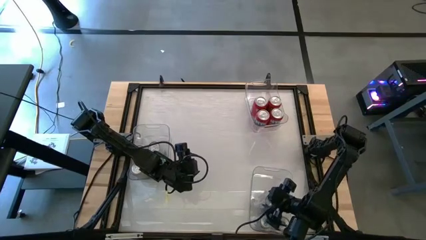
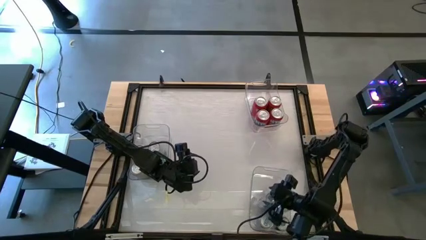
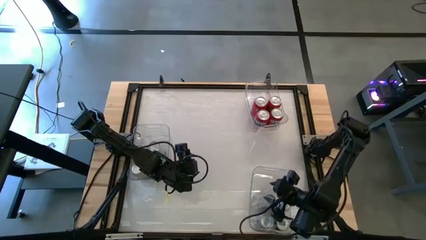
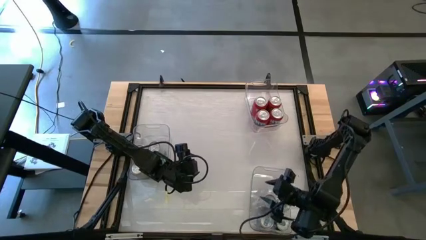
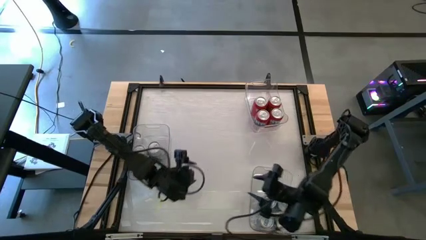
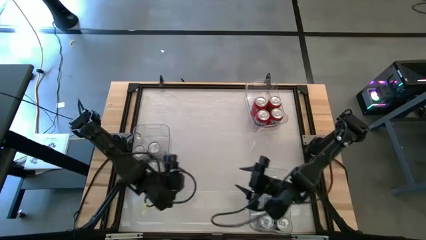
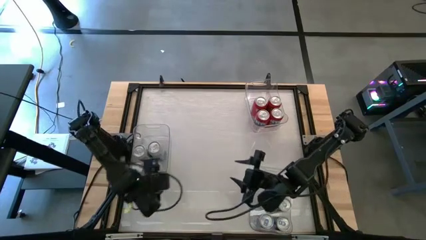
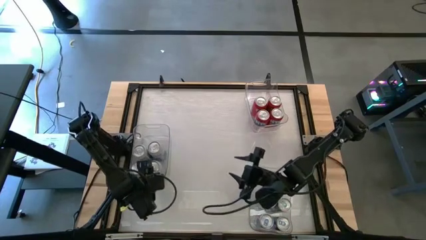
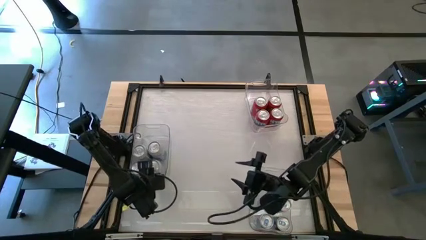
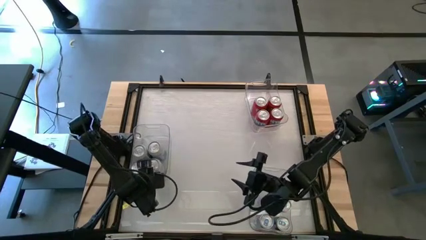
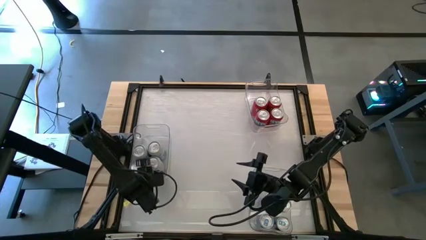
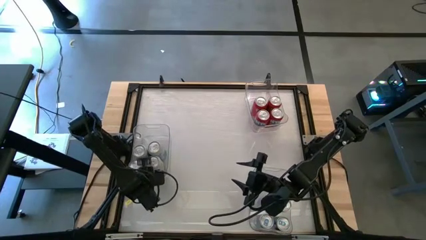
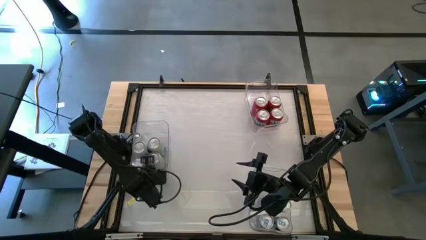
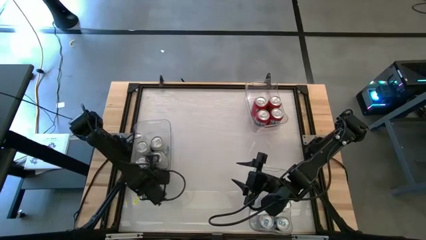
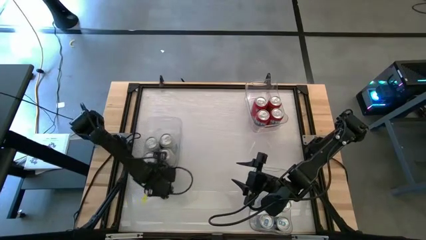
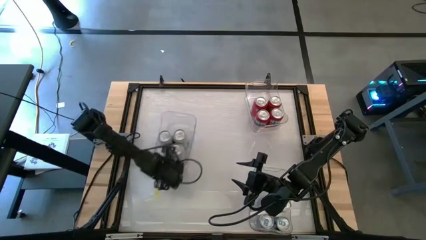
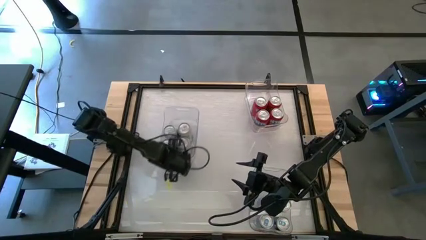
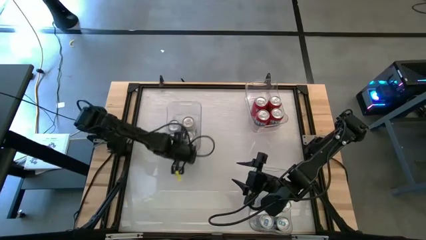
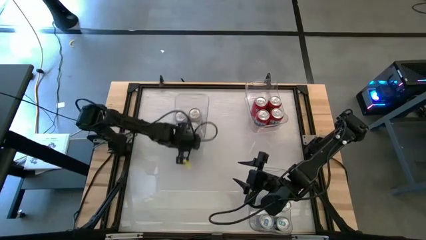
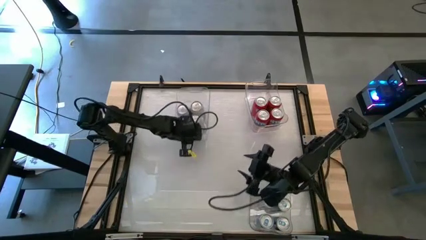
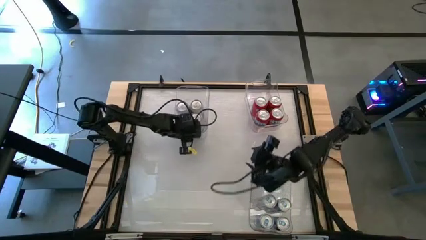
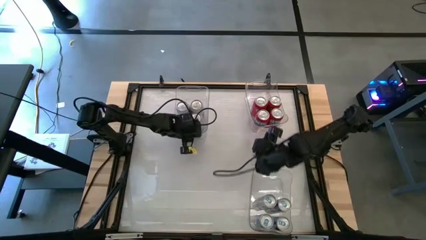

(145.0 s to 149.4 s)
Task: Sort soda cans
Move the middle left transparent bin to the top left of the table

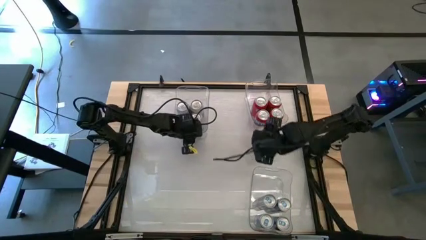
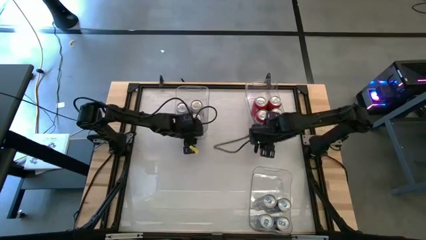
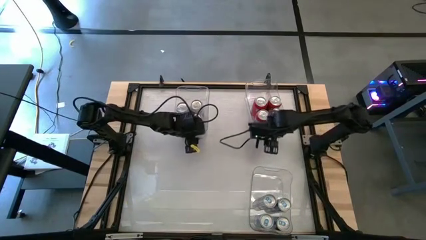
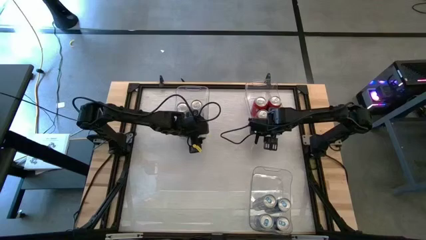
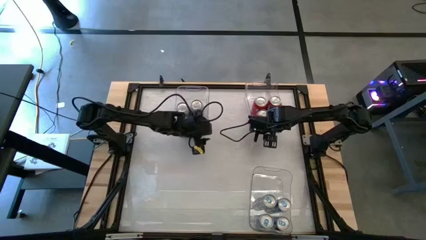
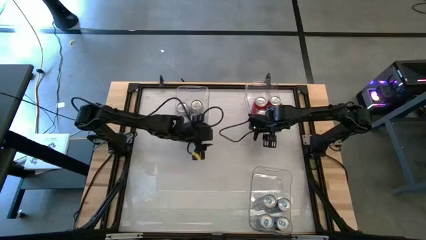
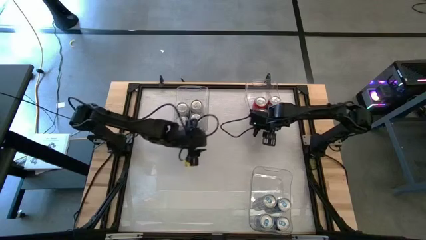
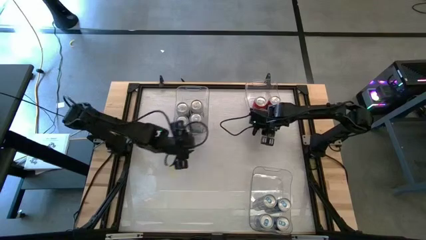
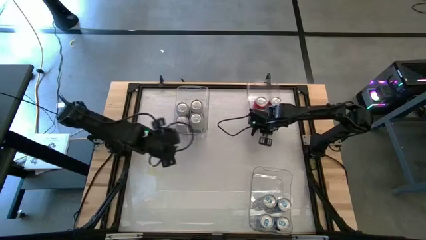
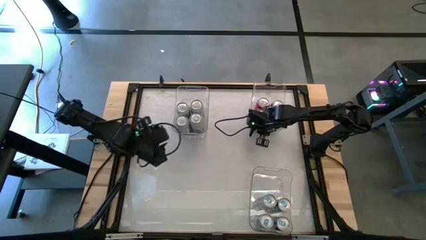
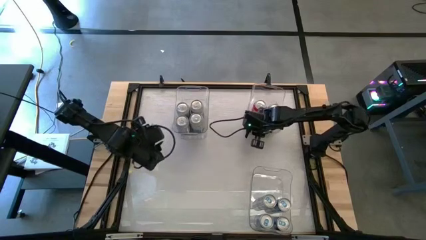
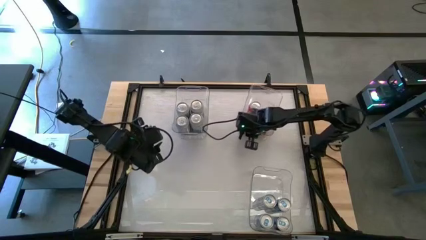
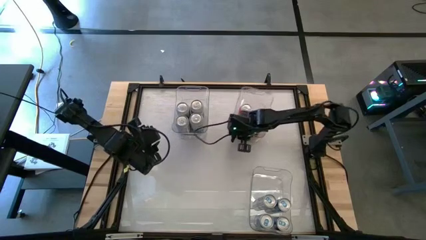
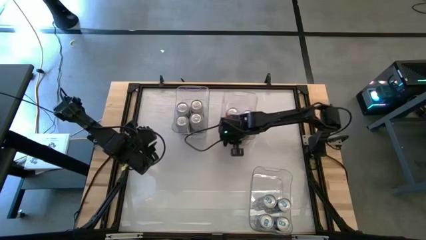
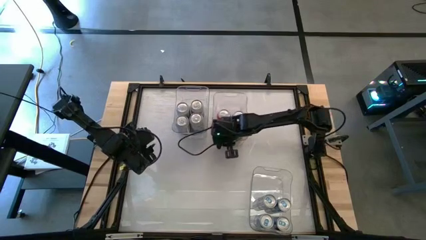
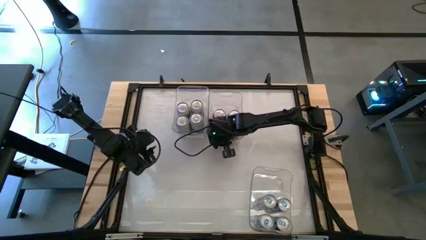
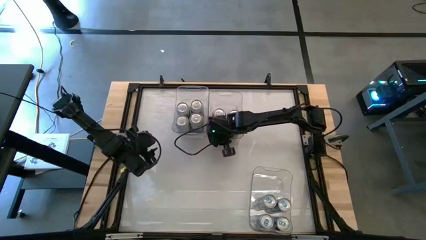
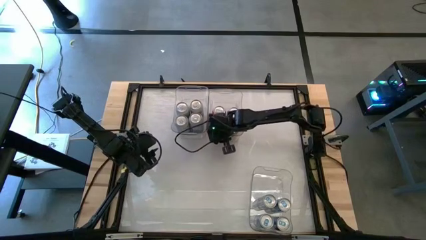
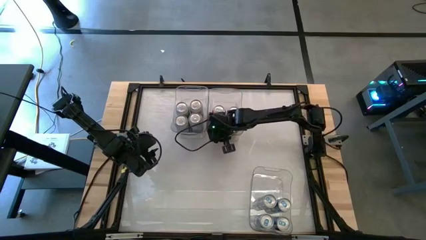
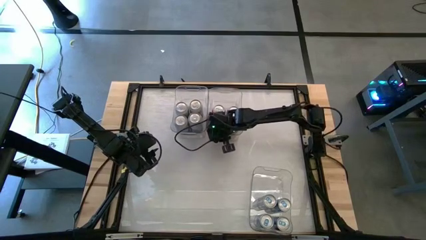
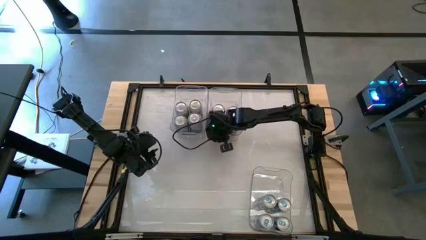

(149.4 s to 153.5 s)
Move the top right transparent bin to the center top of the table

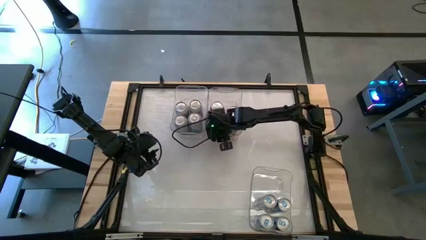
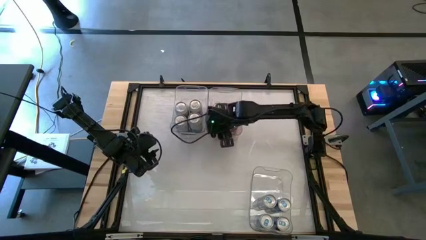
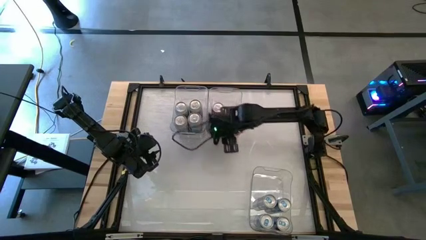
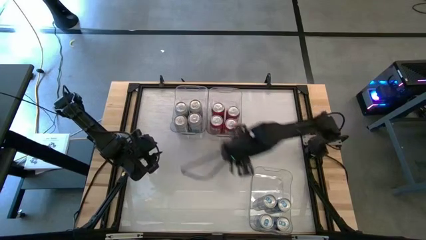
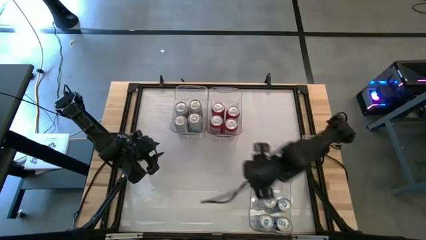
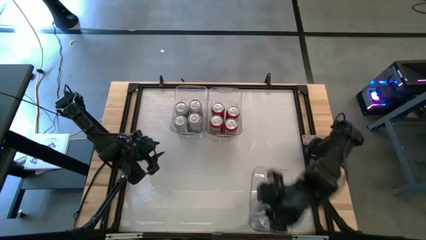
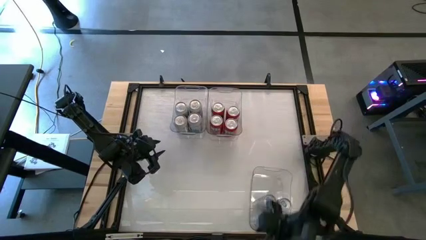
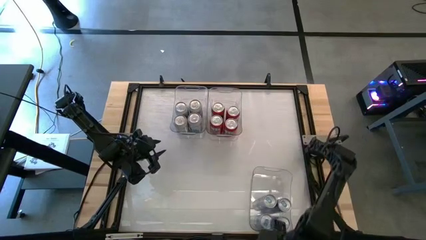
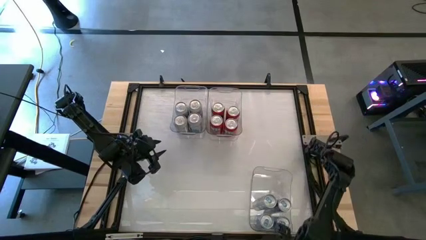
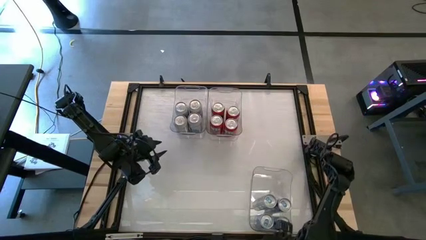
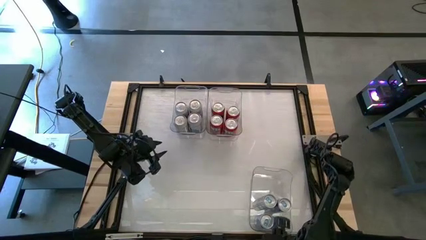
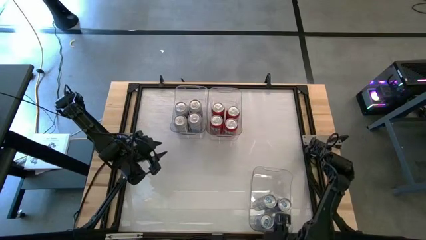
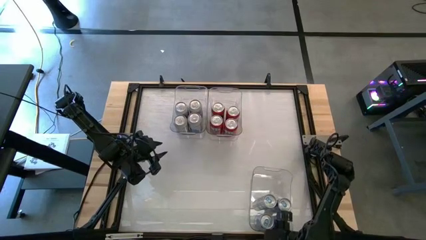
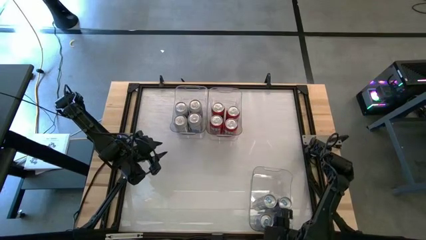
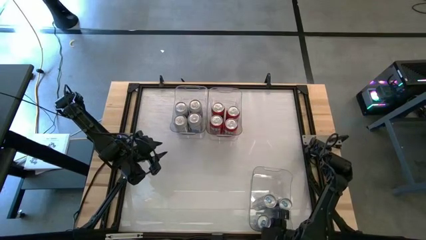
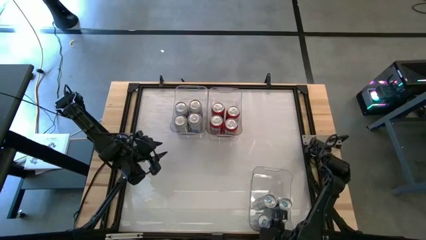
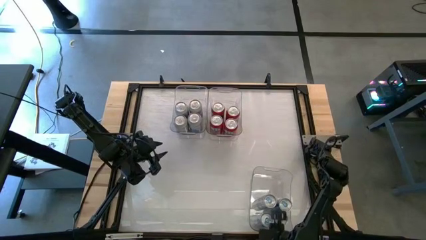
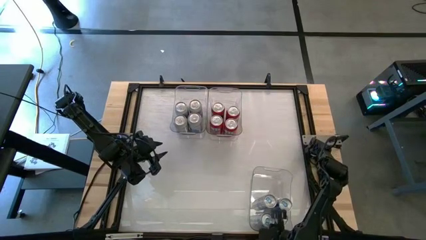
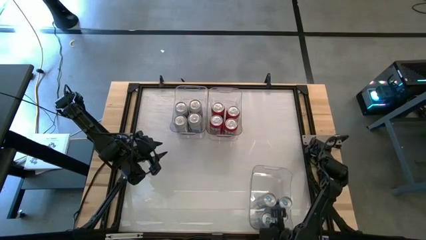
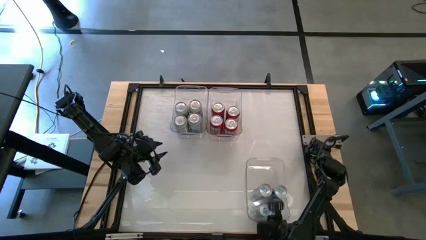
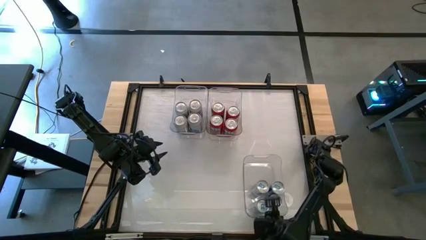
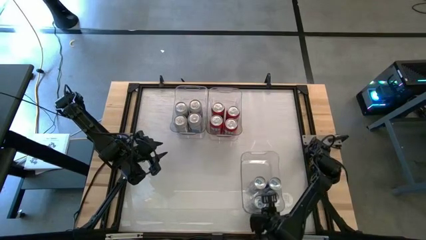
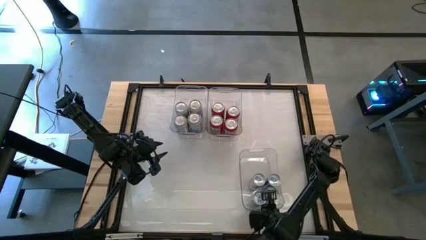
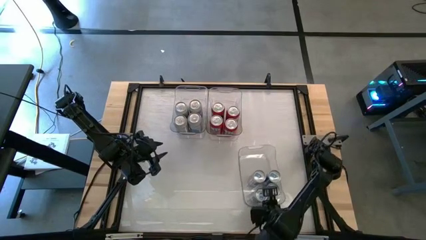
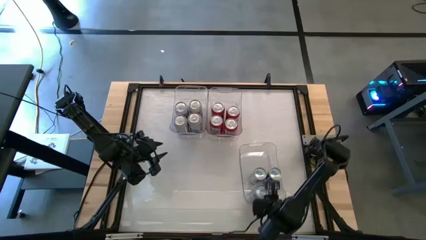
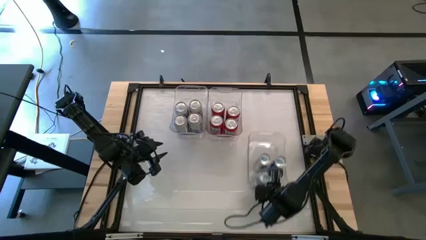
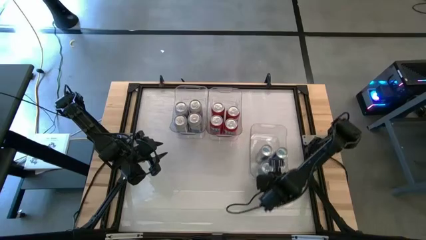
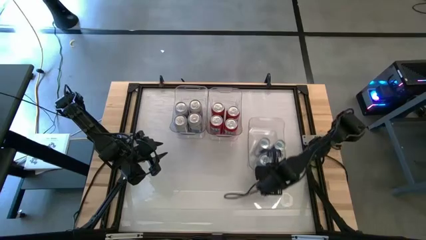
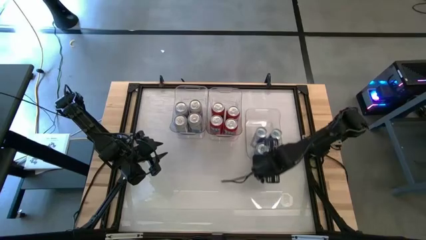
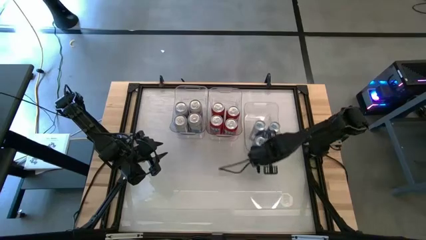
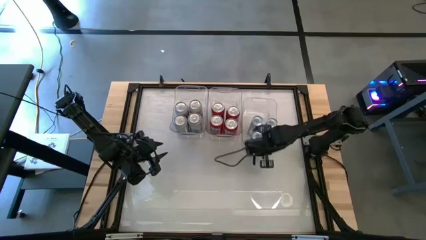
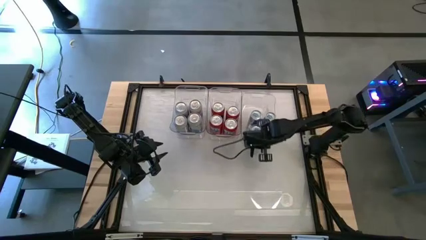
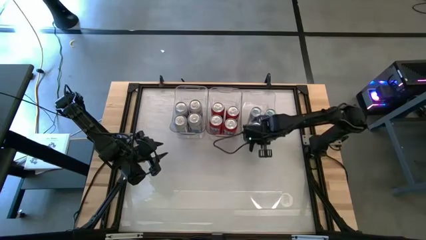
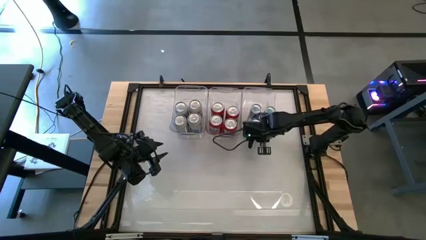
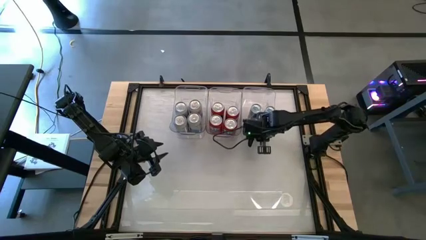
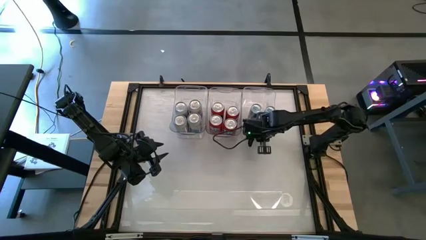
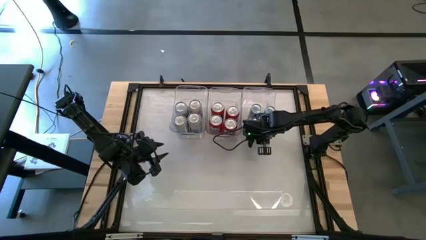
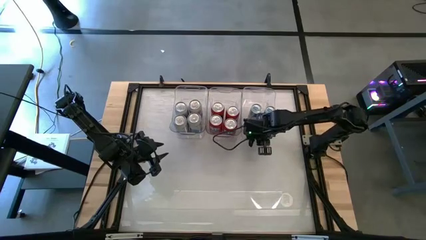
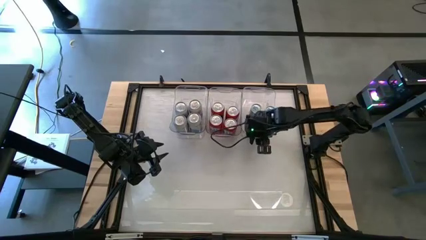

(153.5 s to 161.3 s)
Move the bottom right transparent bin to the top right of the table

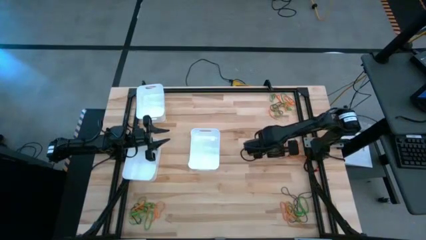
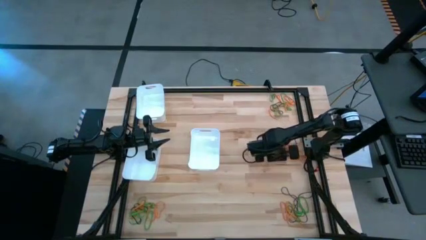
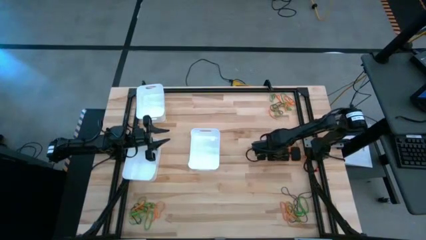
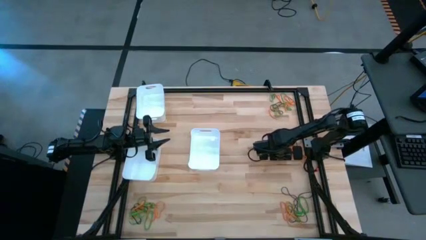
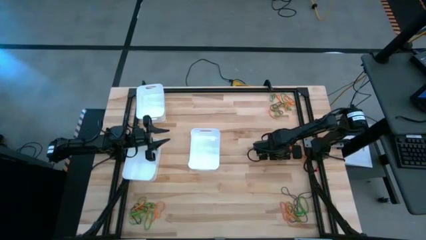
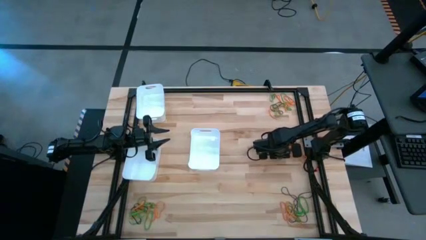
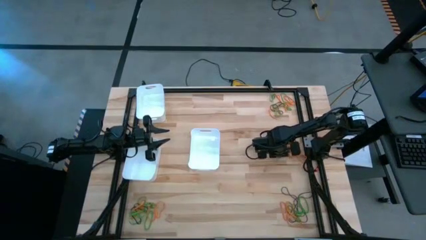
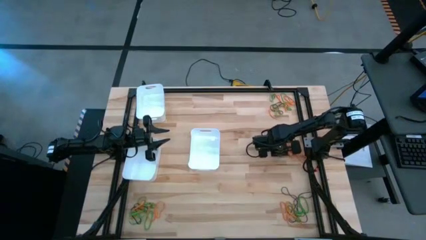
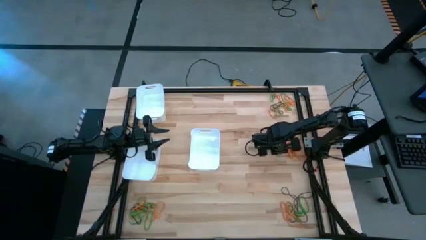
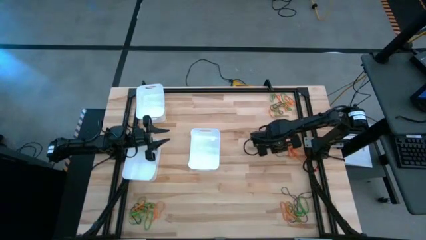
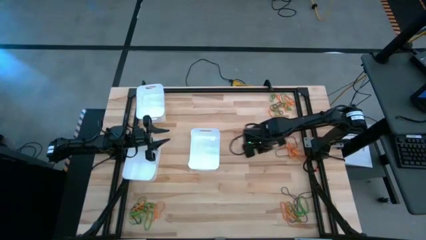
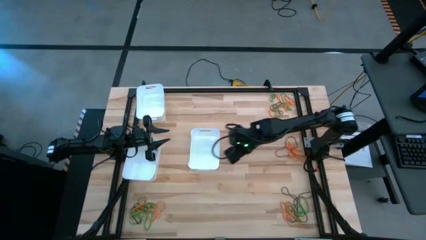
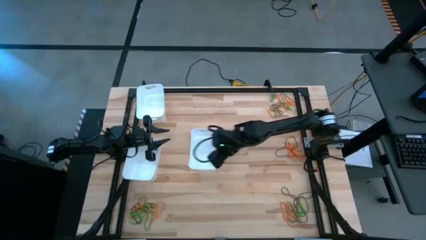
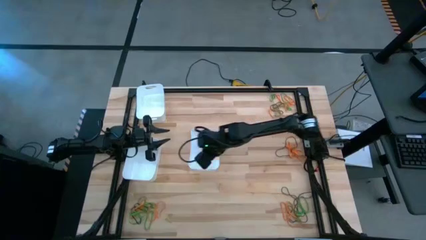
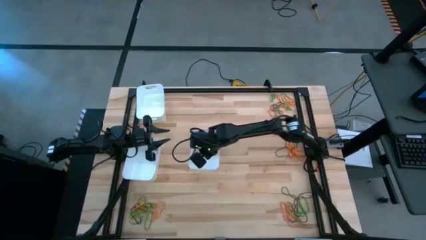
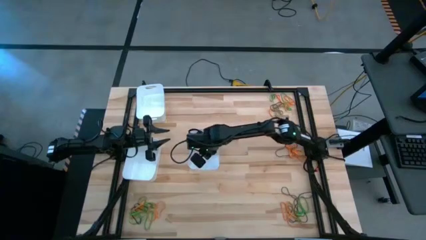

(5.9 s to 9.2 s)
Task: Sort rubber bands into baskets
Put the orange rubber band into the bottom right white bin
